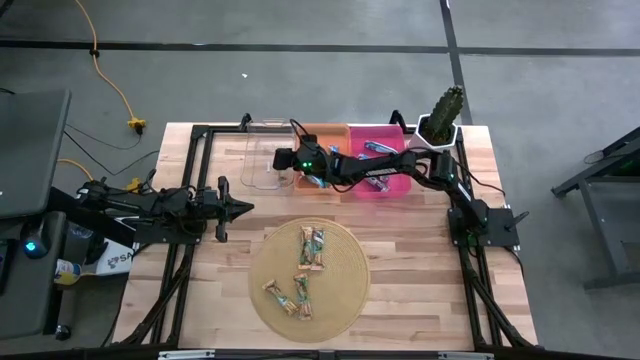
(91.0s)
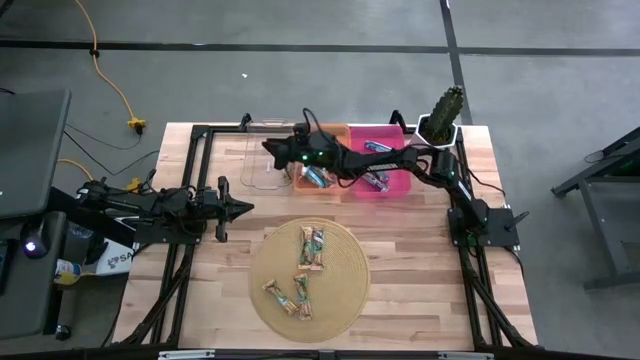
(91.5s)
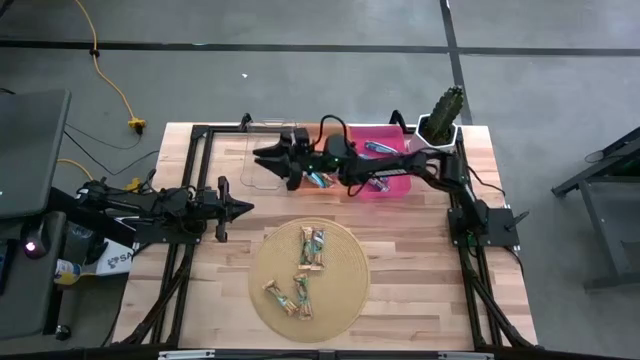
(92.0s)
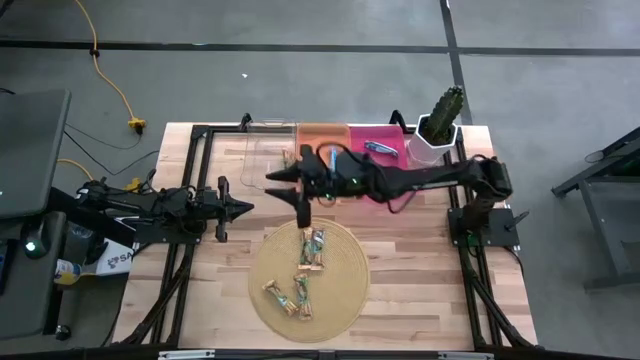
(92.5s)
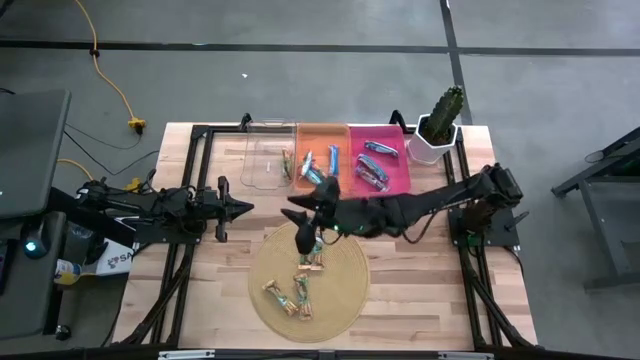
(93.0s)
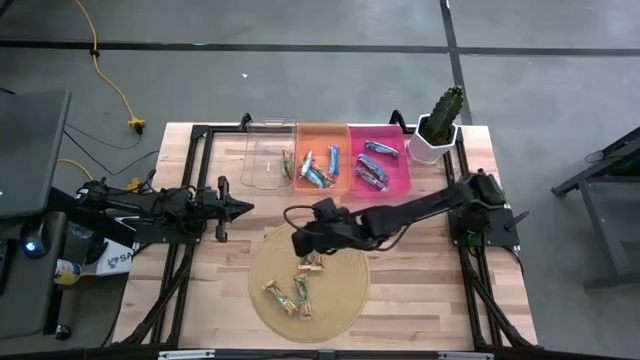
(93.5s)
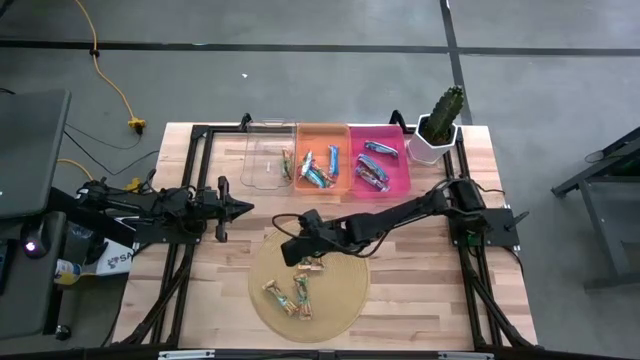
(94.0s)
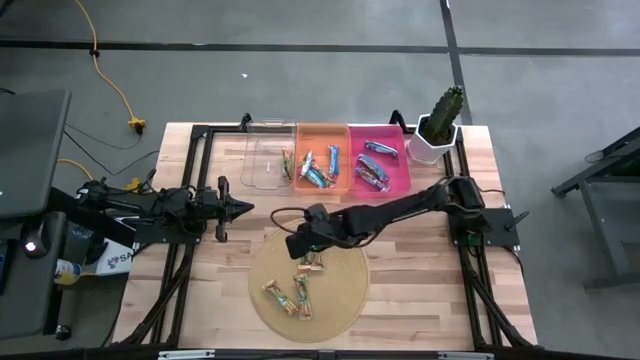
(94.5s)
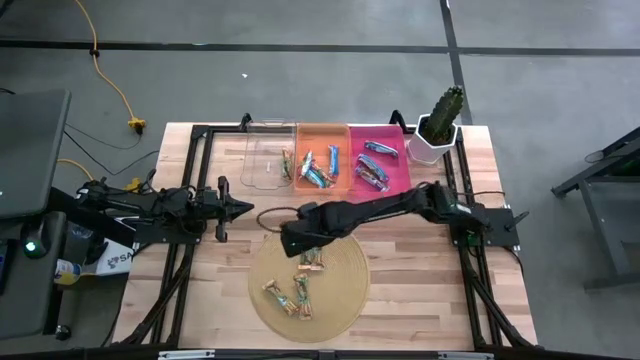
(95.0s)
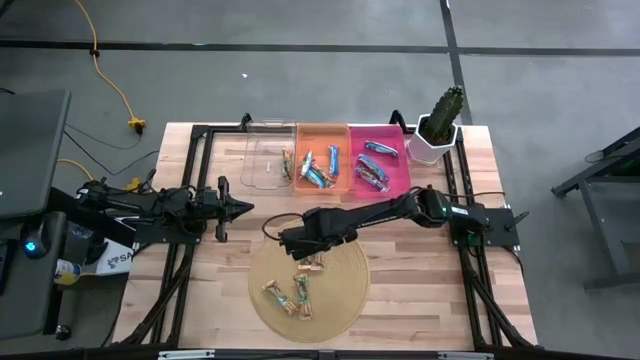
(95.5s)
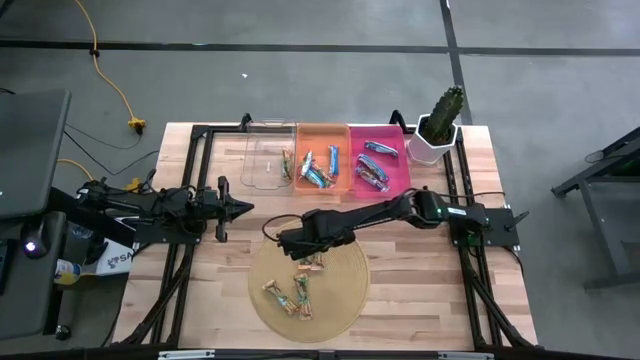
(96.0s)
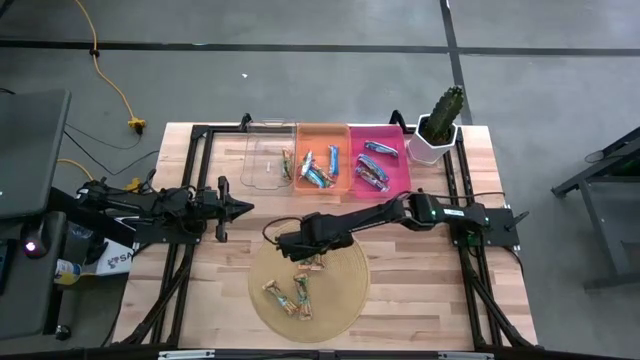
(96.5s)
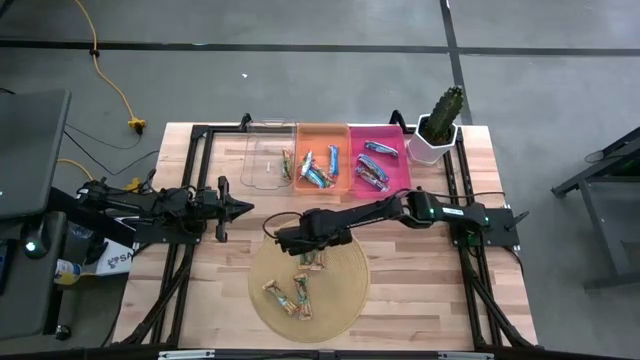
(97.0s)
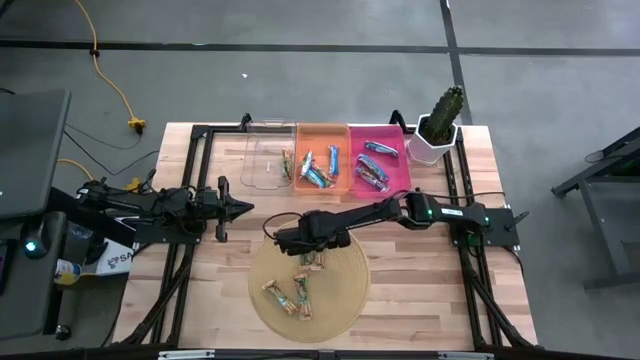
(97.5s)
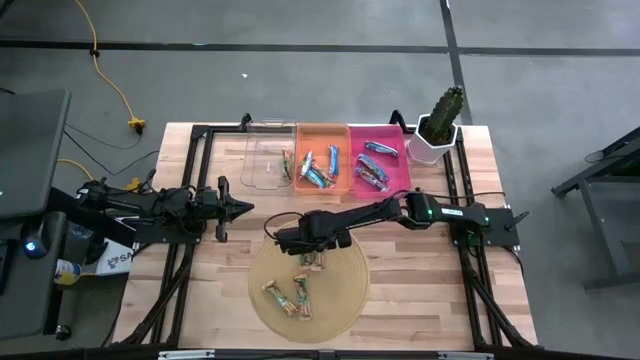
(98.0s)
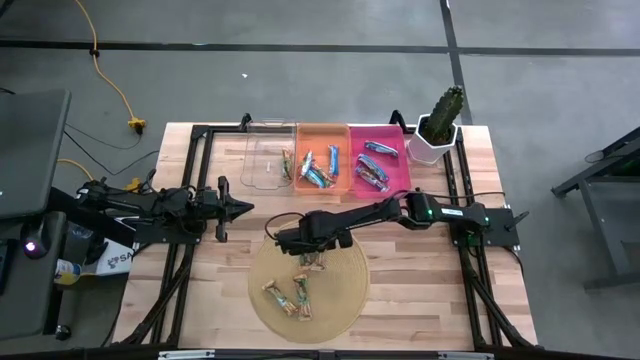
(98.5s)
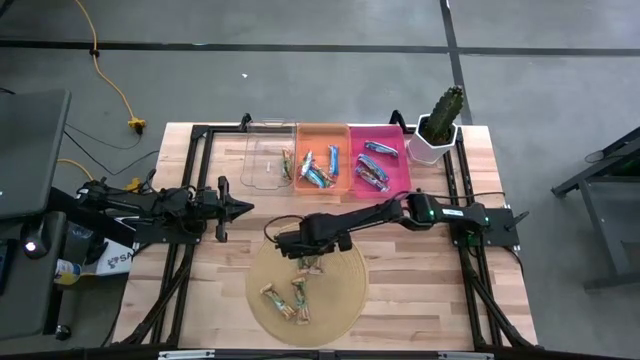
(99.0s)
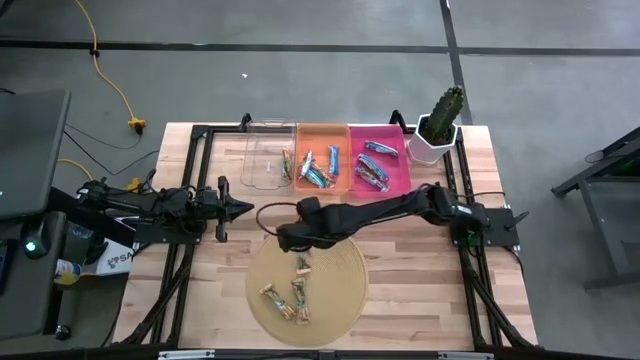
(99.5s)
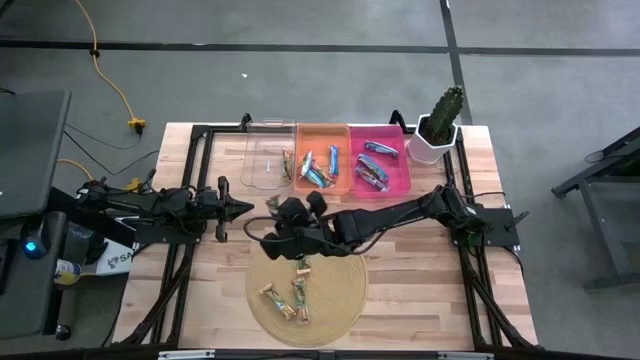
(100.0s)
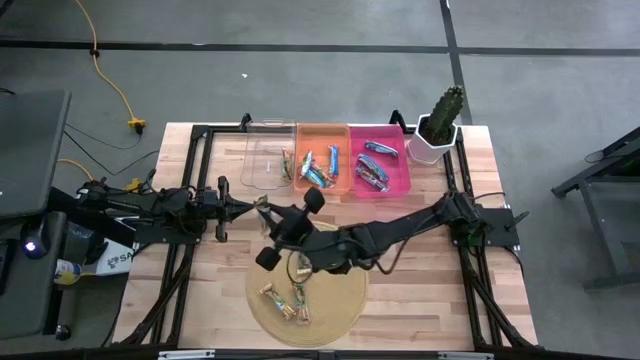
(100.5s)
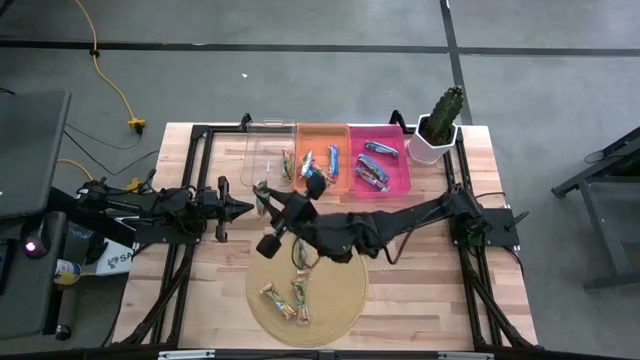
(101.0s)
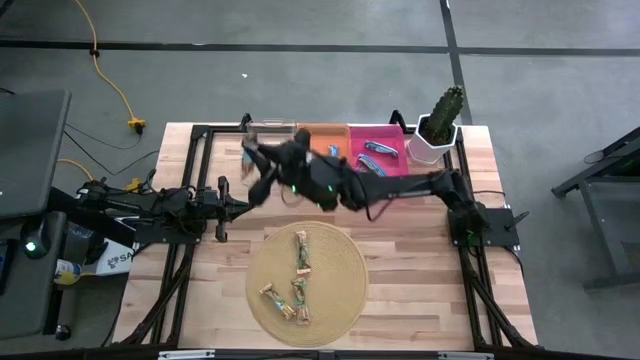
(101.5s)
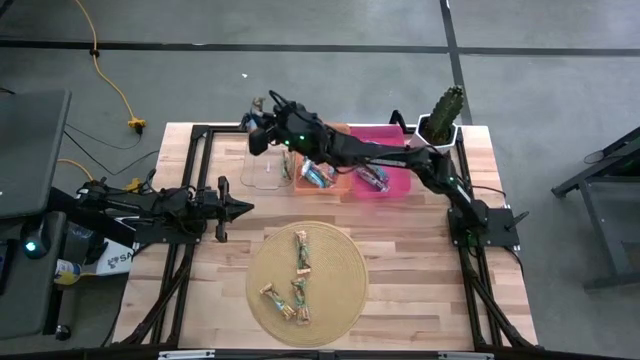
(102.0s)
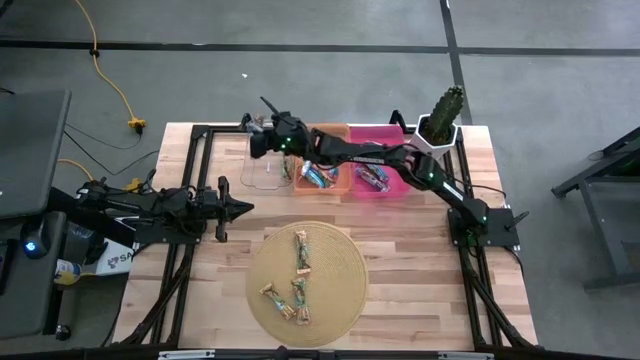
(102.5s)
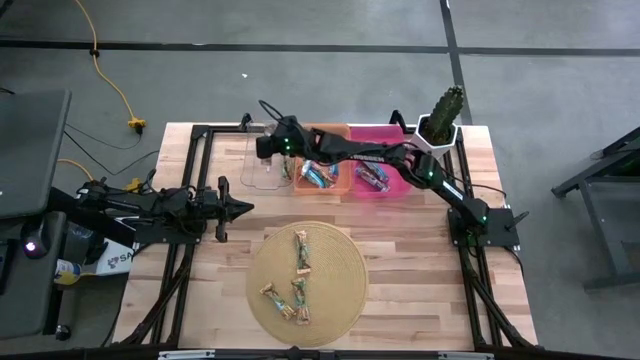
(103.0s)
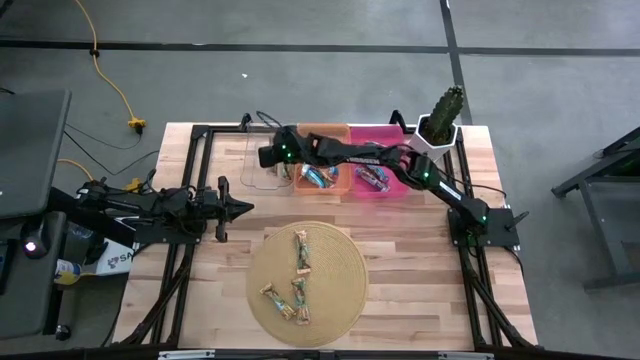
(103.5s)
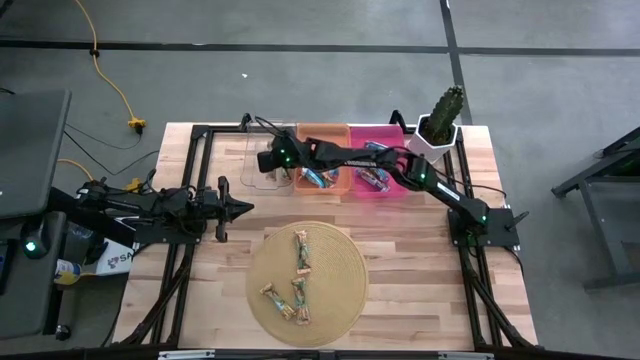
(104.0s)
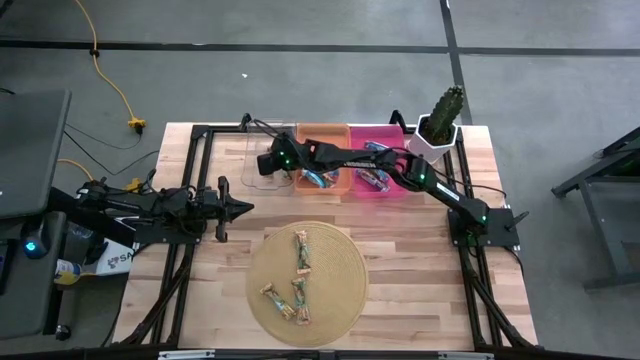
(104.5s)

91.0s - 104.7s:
Task: Pick and place Granola Bars by type
Put the yellow granola bar into the transparent bin

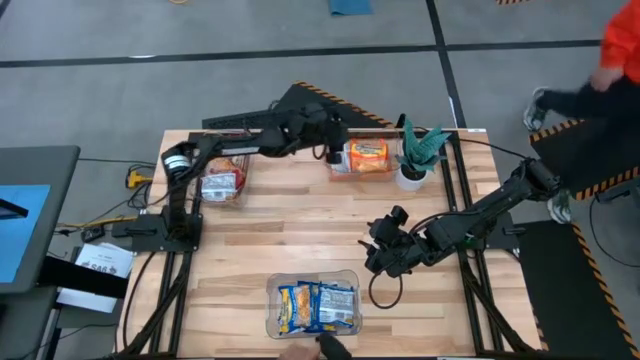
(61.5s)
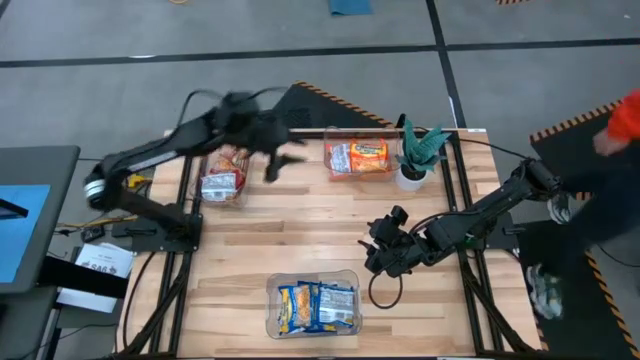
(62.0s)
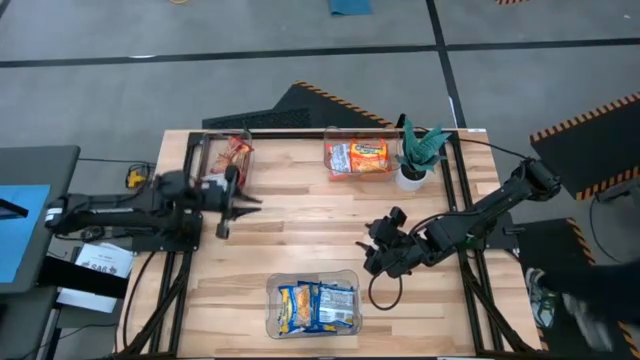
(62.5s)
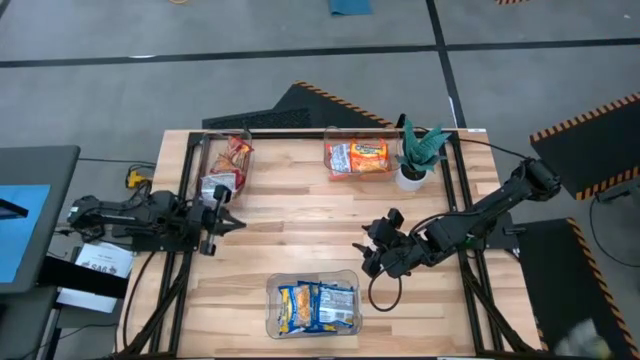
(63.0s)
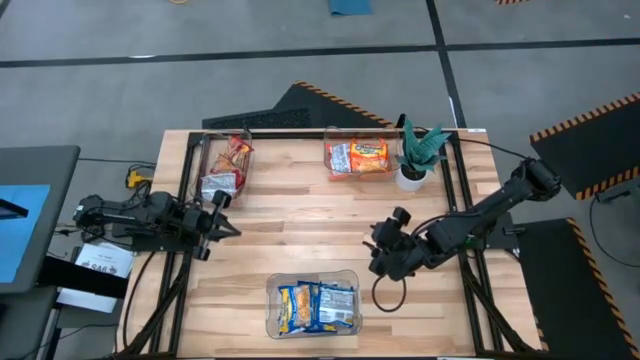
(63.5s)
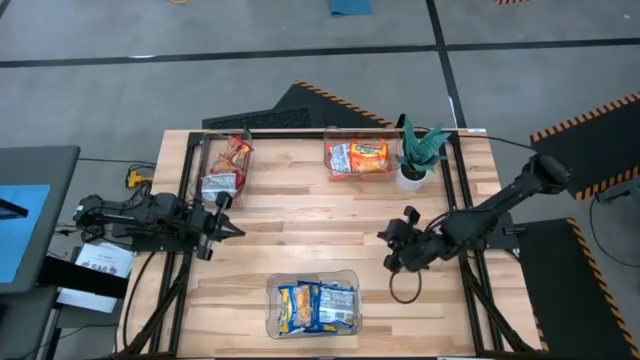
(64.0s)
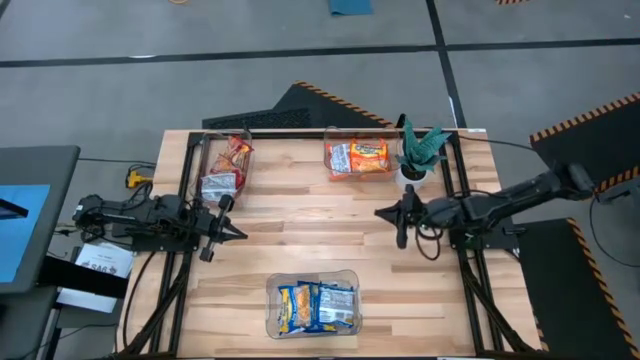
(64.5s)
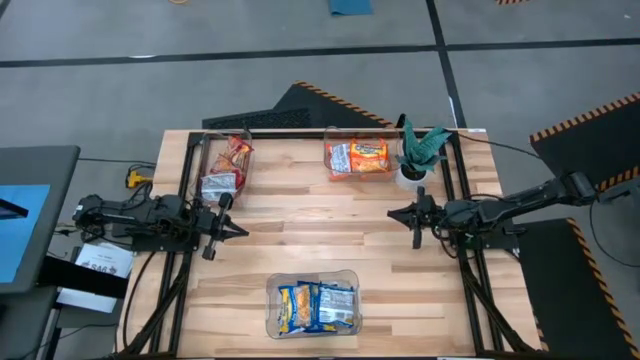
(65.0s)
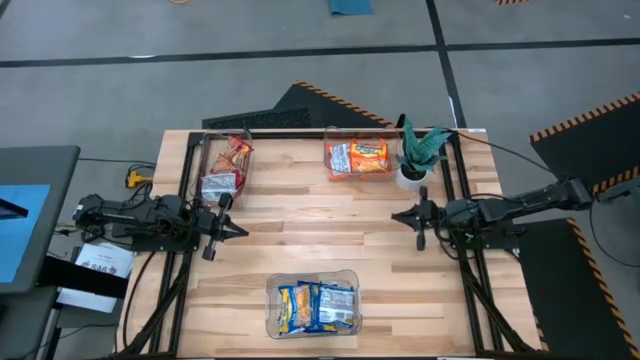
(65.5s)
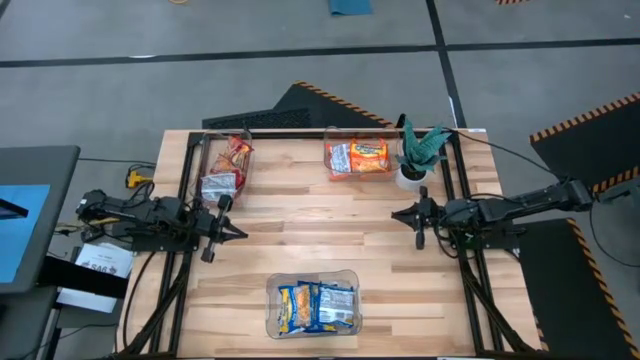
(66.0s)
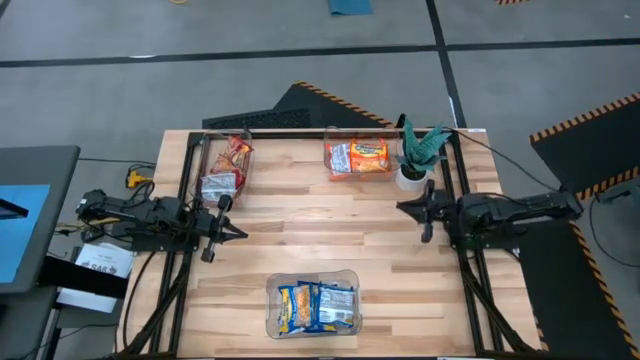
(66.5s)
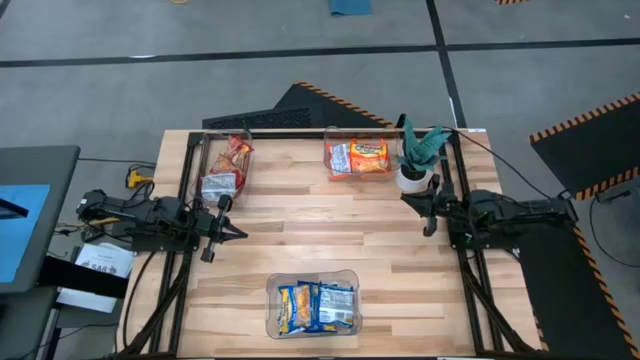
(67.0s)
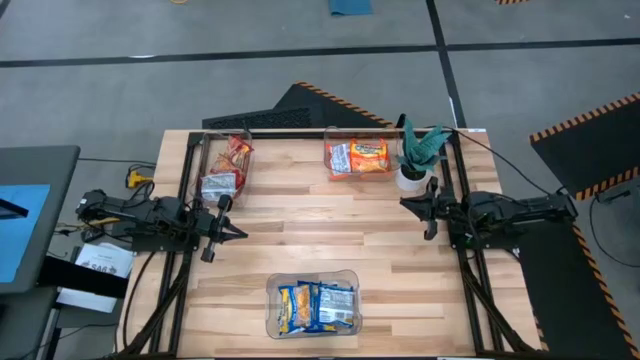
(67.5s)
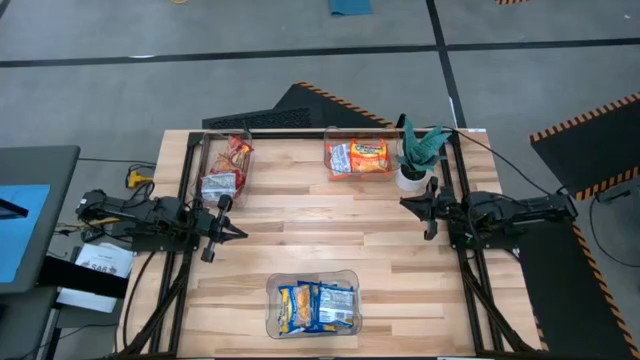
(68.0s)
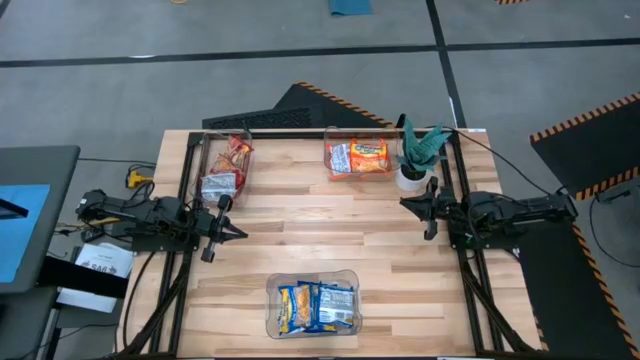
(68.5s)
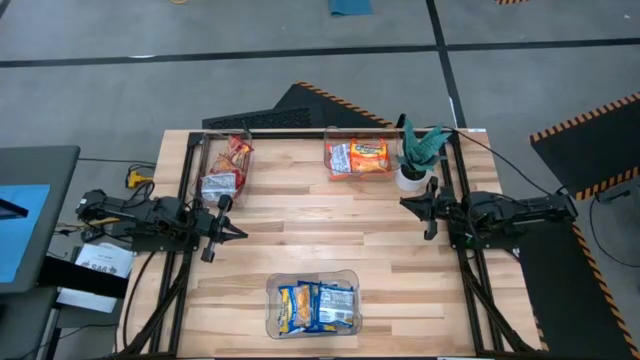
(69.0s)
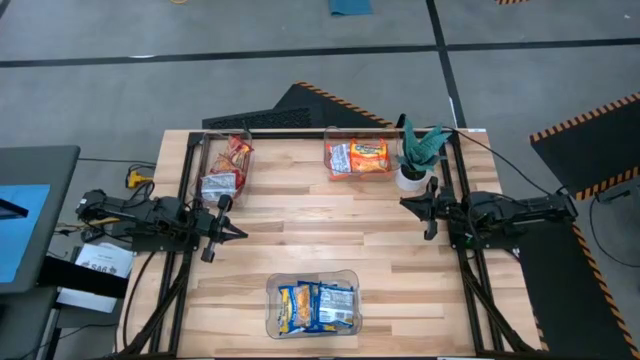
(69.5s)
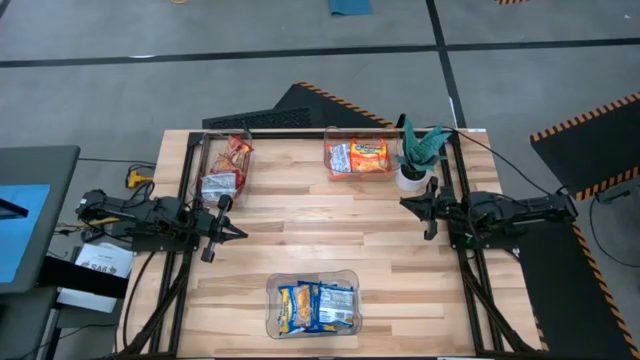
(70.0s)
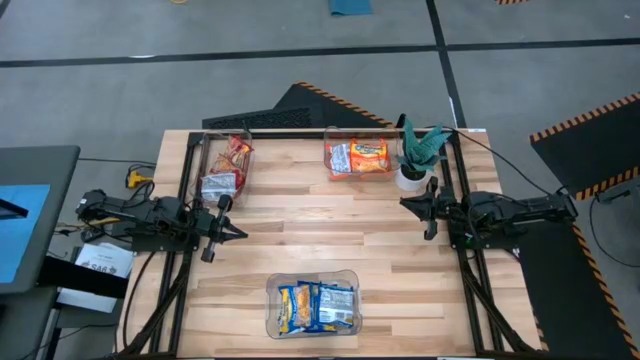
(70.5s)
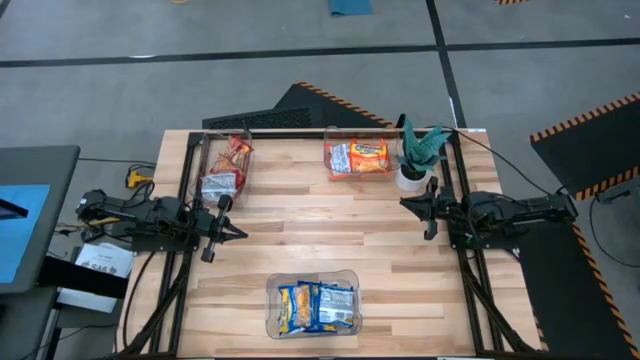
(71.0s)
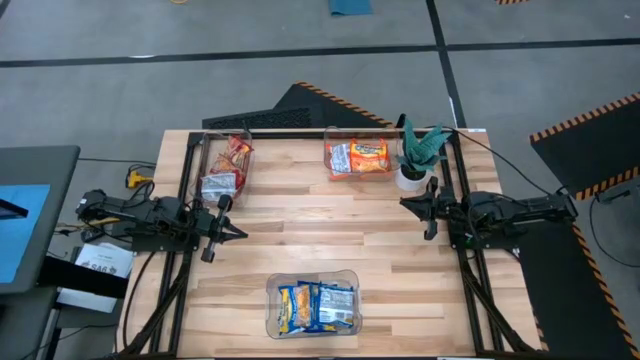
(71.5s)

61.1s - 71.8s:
Task: Sort Maruchan noodles
Return to Home Position
